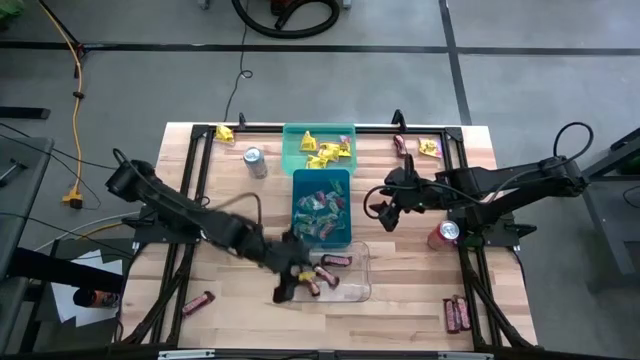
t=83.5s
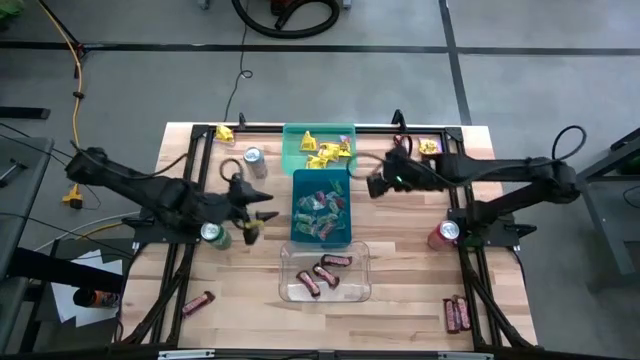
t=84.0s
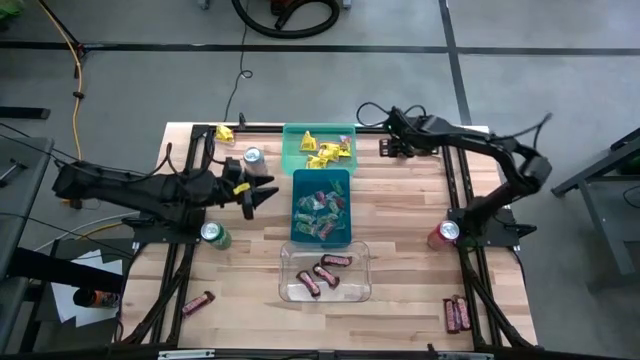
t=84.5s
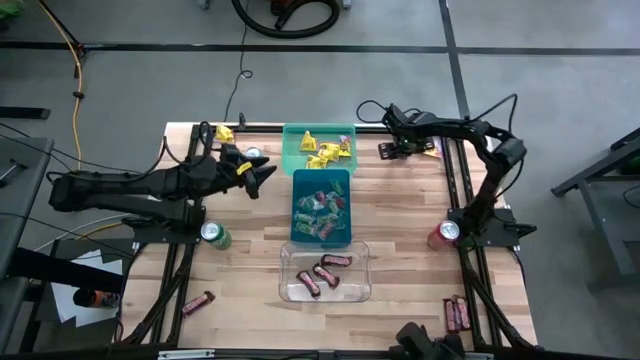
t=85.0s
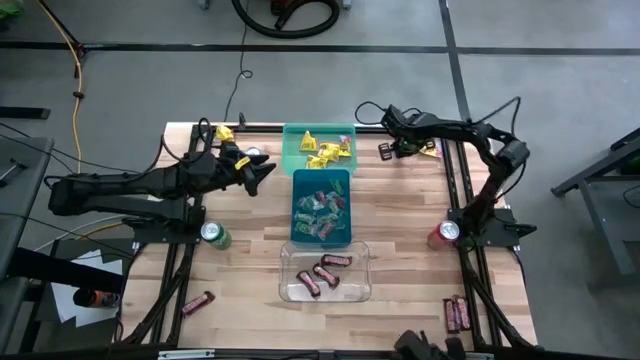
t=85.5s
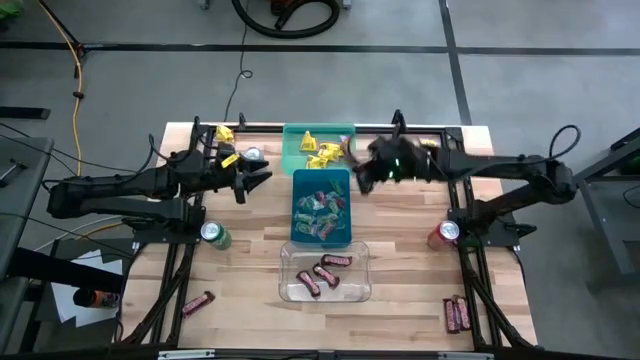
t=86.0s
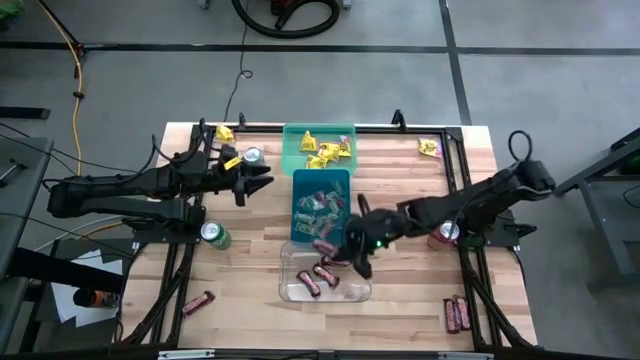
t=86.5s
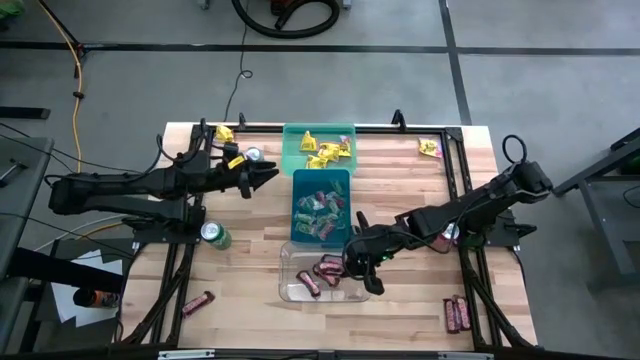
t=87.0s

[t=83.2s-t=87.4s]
Task: Sort candy
Put the brown candy into the transparent bin

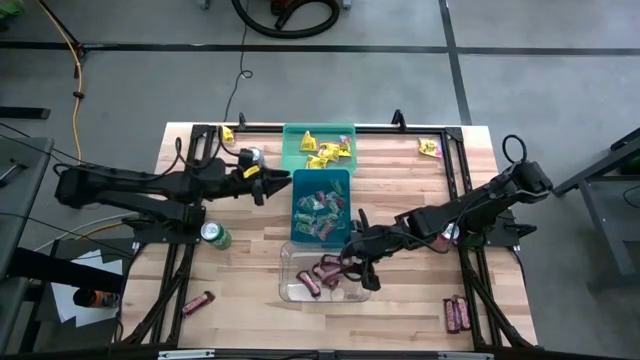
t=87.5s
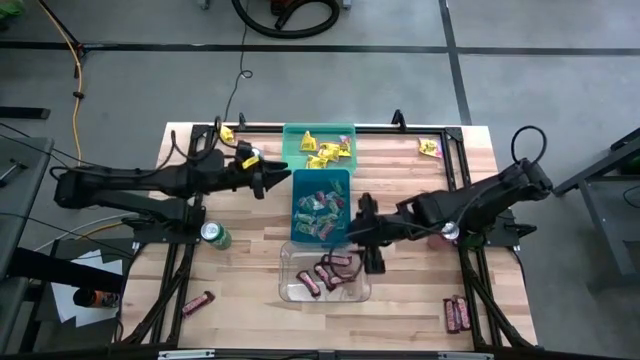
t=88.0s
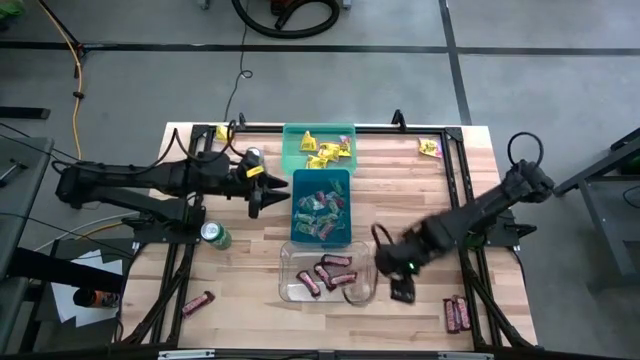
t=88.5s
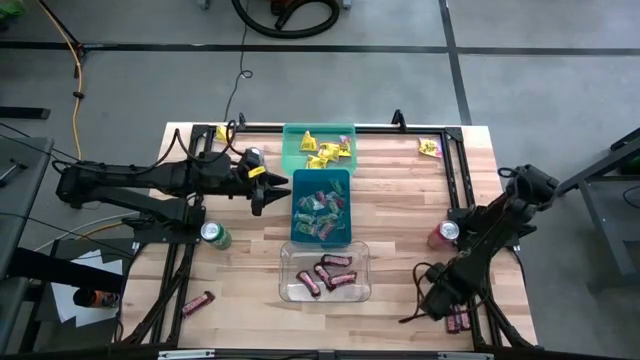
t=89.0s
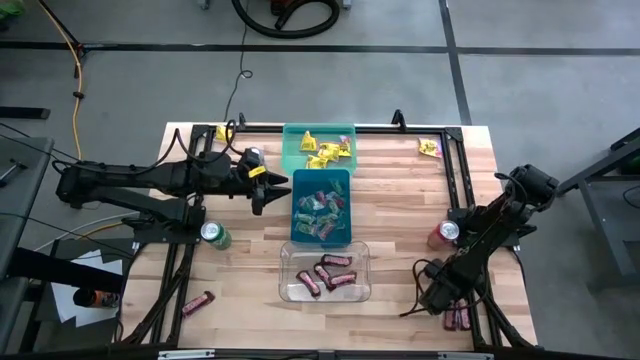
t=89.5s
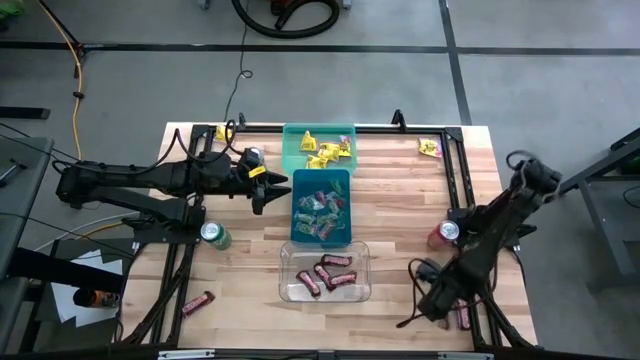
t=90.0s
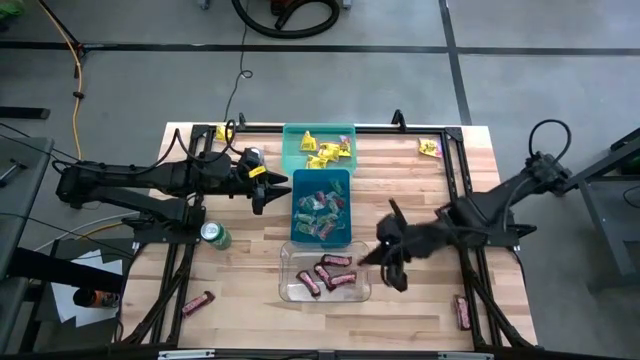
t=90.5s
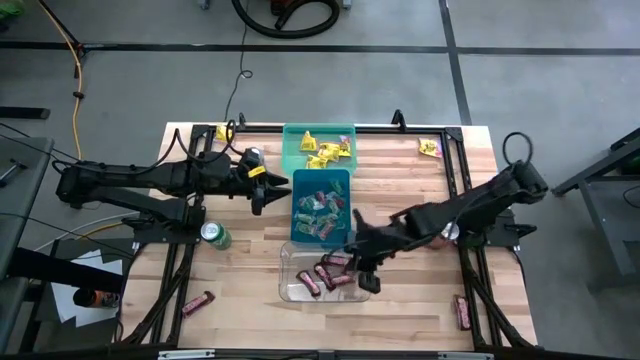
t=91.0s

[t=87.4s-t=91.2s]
Put the brown candy into the transparent bin

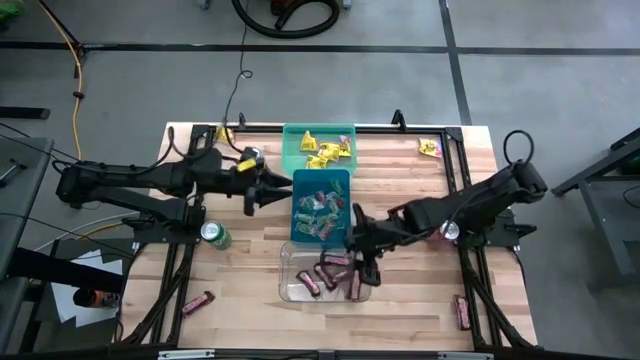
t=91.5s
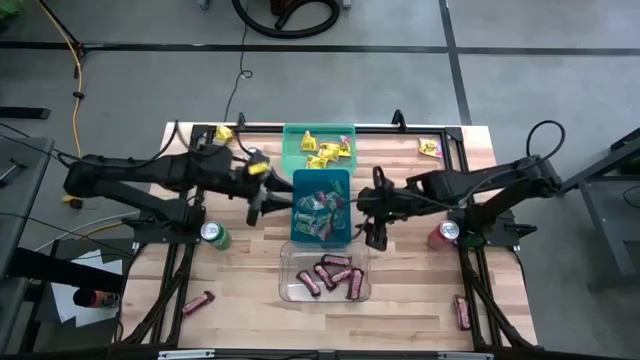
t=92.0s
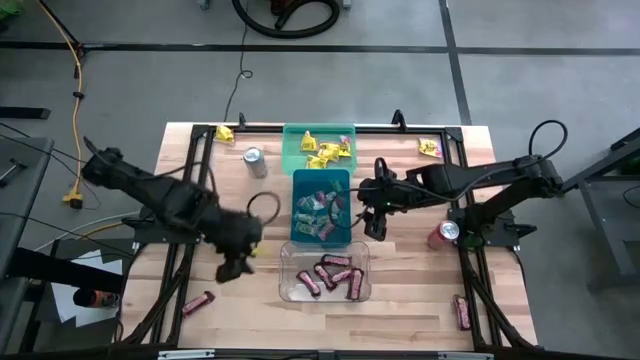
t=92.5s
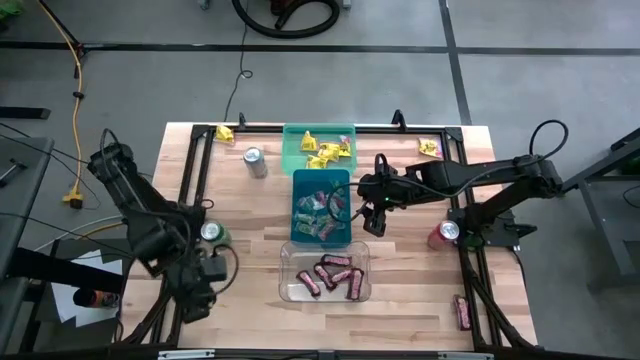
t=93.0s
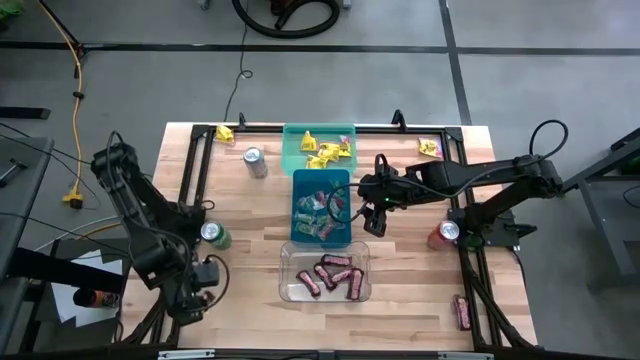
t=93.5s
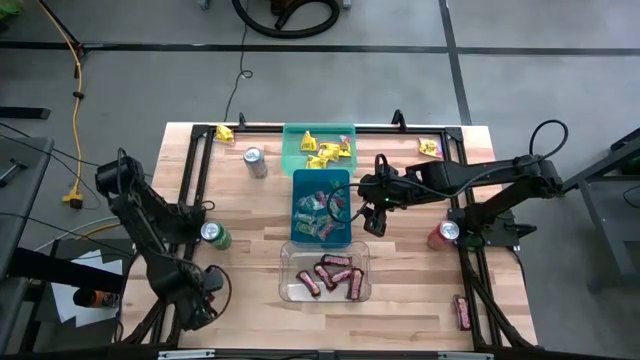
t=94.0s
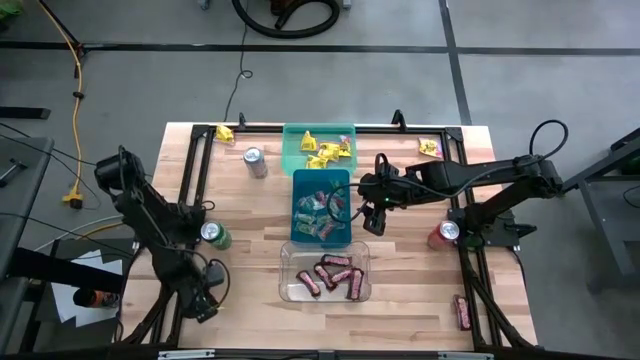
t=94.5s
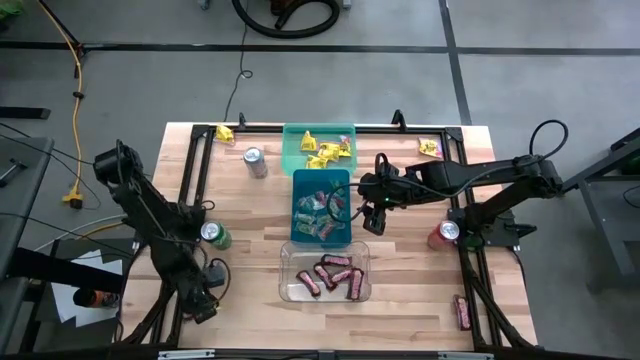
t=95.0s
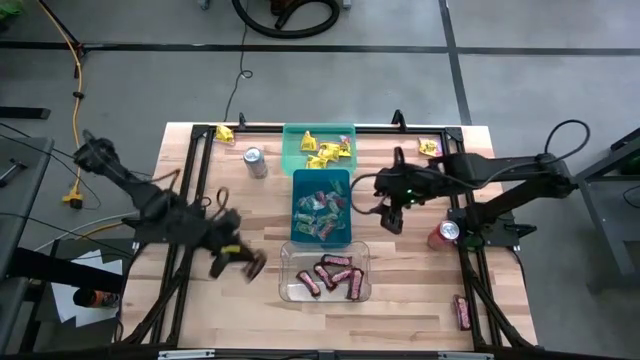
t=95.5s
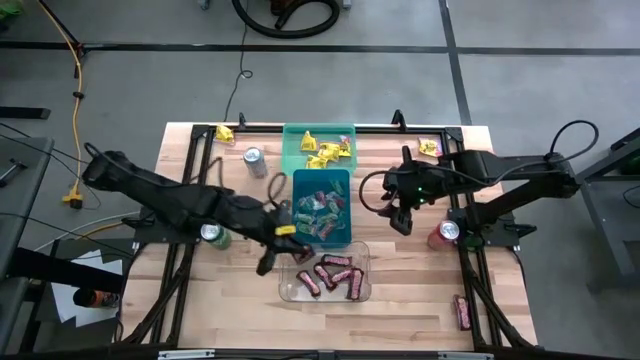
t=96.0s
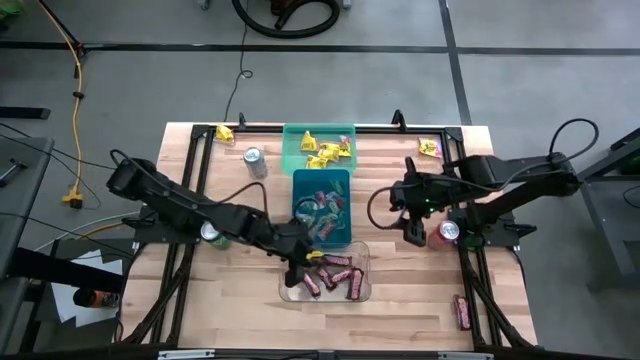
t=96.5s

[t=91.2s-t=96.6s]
Put the brown candy into the transparent bin

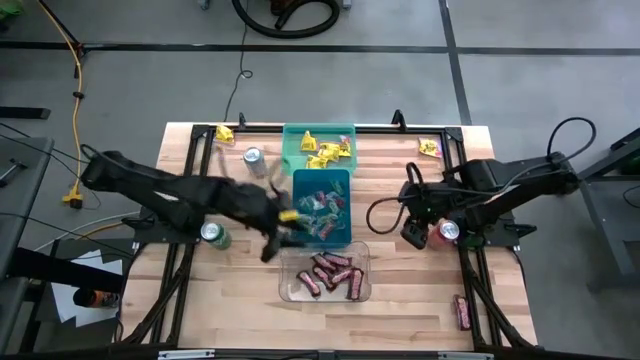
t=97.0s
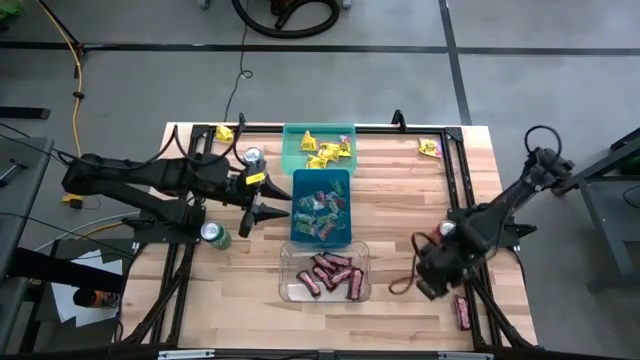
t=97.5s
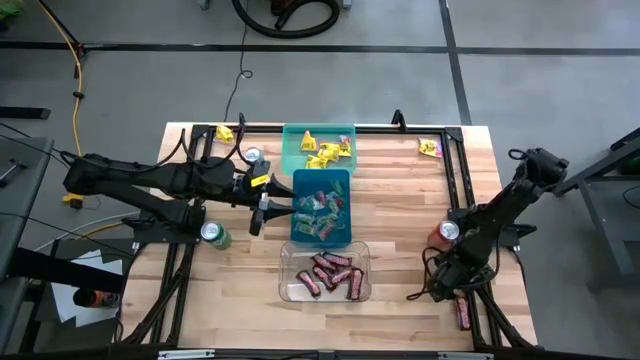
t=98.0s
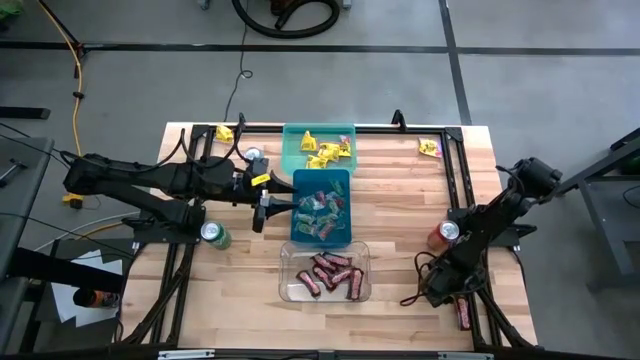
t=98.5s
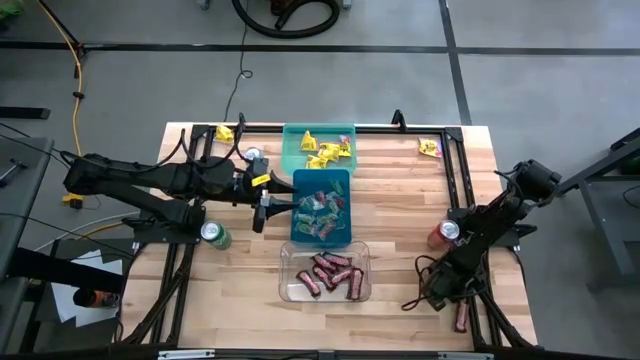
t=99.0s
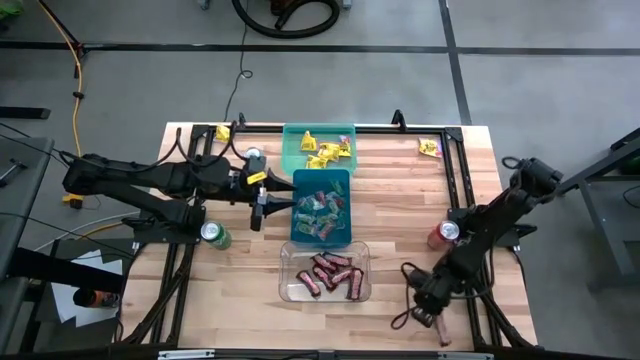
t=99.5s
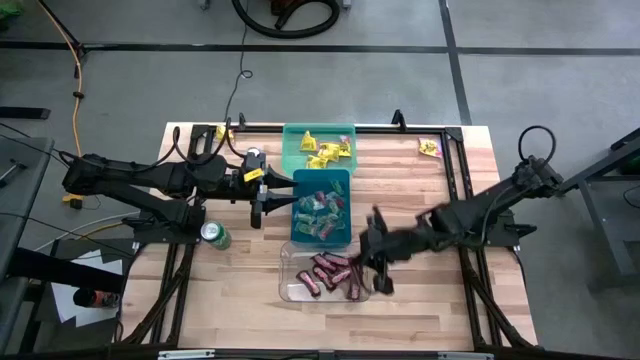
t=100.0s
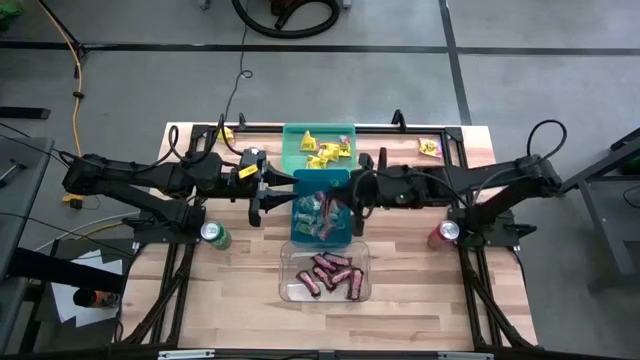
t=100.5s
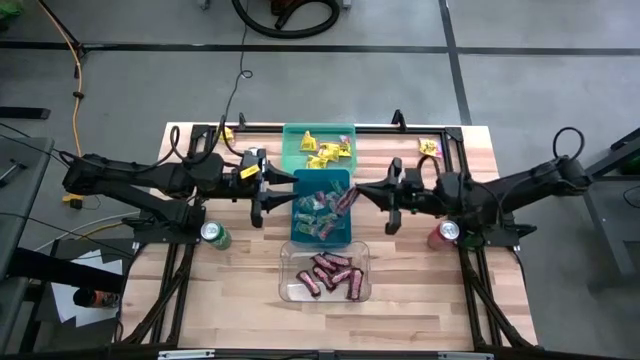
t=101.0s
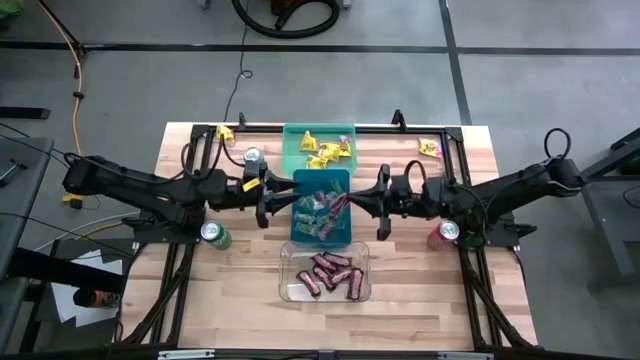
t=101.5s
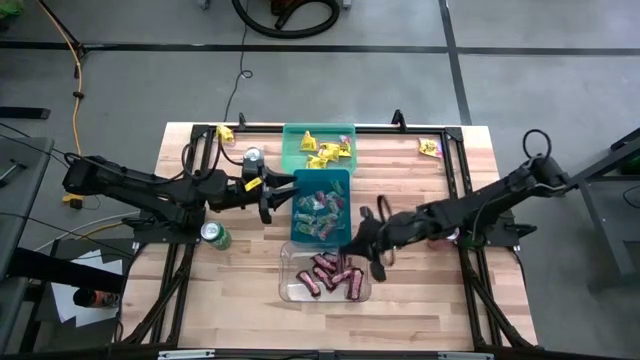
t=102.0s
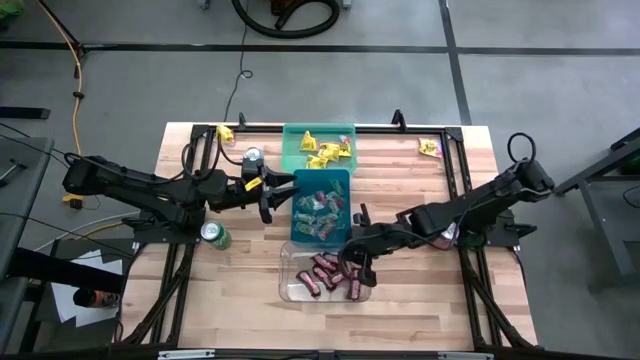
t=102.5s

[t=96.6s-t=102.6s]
Put the brown candy into the transparent bin

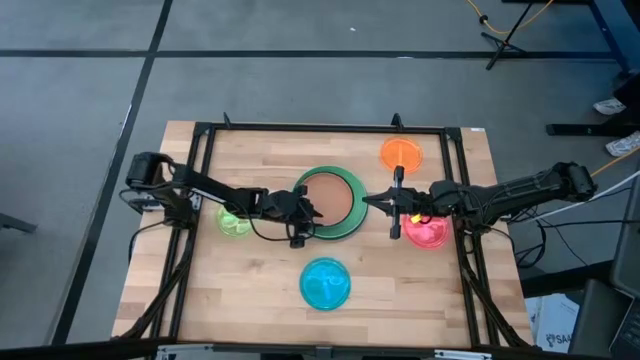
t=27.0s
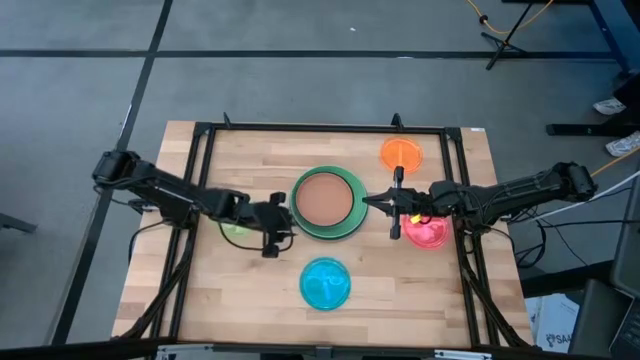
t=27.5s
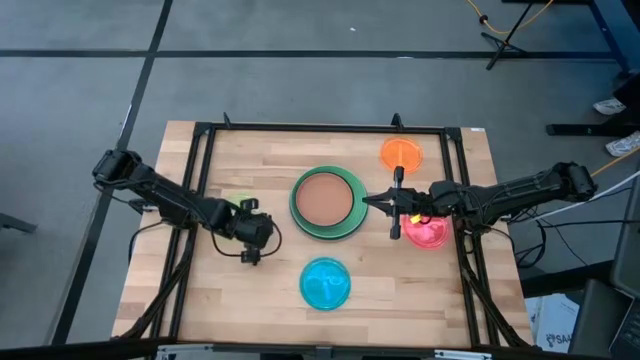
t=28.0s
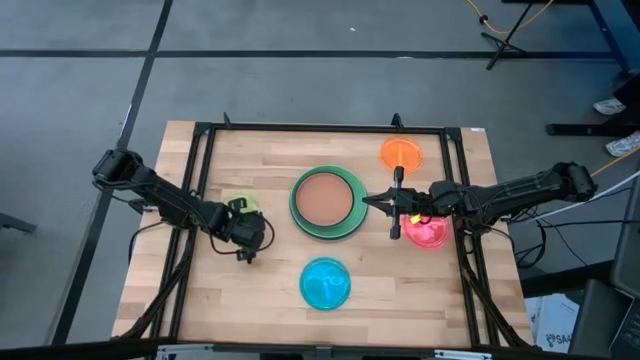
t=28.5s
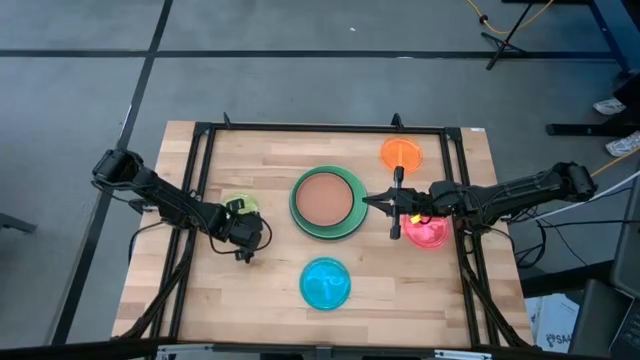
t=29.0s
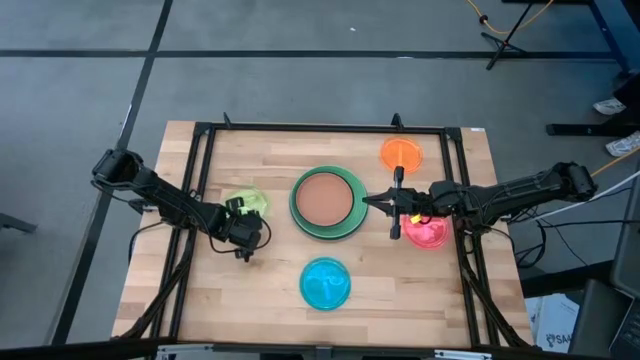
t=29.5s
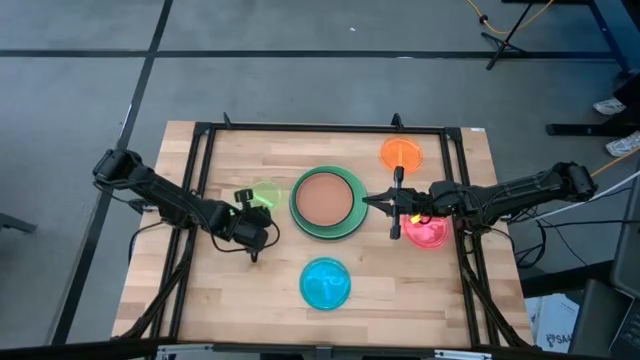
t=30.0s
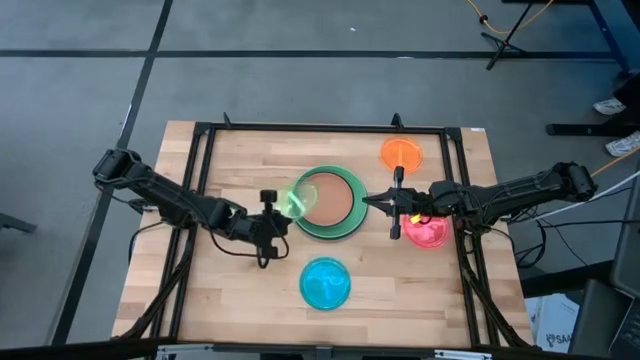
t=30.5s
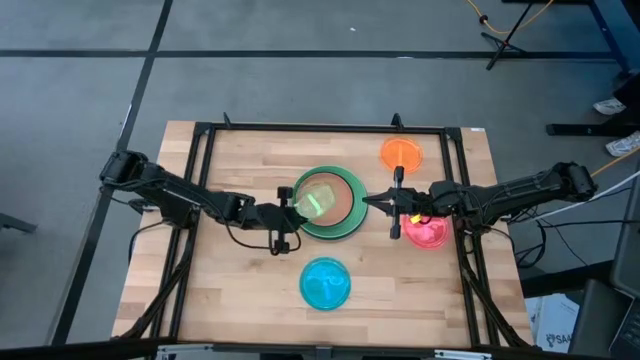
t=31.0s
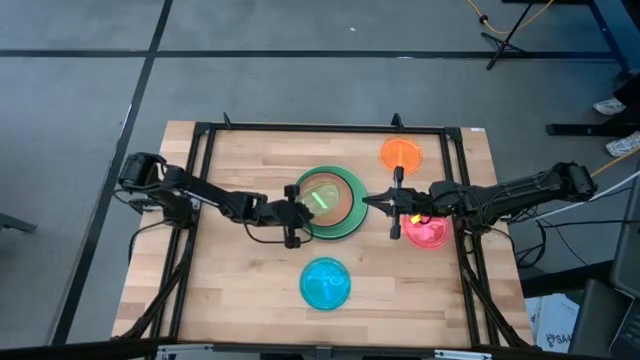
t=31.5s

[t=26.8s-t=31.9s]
Task: Stack plastic plates
Stack the light green plate on top of the brown plate
